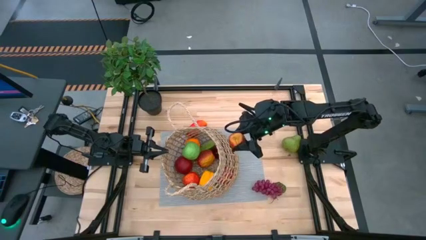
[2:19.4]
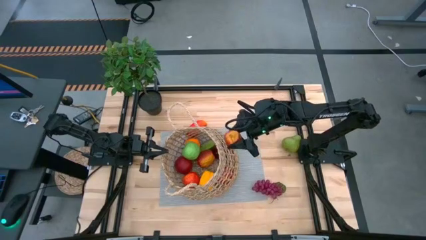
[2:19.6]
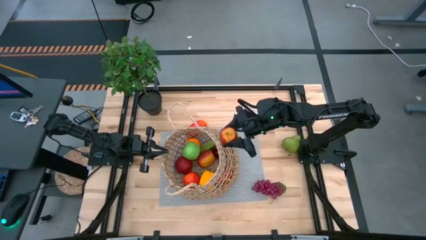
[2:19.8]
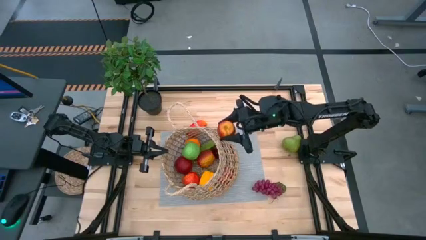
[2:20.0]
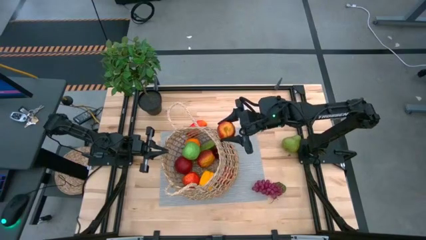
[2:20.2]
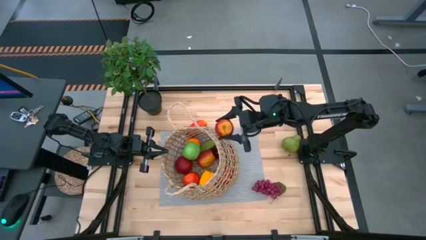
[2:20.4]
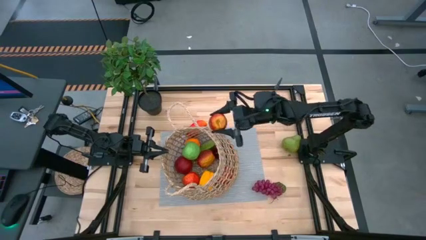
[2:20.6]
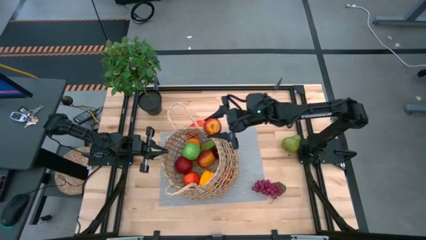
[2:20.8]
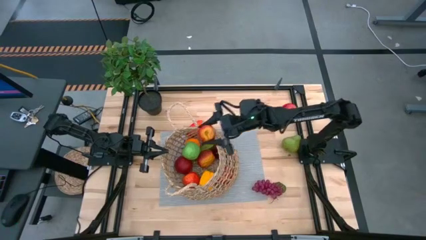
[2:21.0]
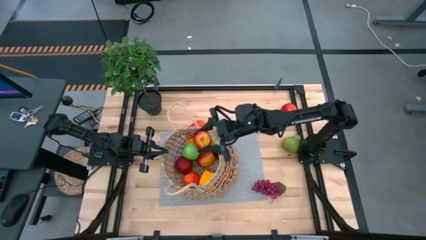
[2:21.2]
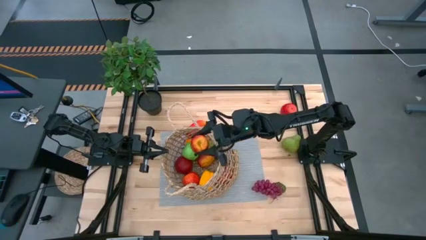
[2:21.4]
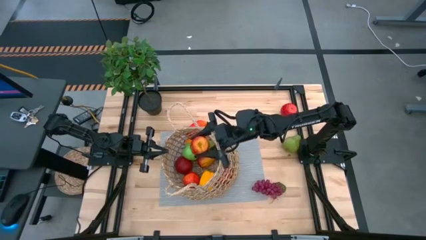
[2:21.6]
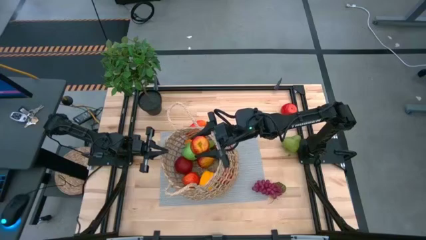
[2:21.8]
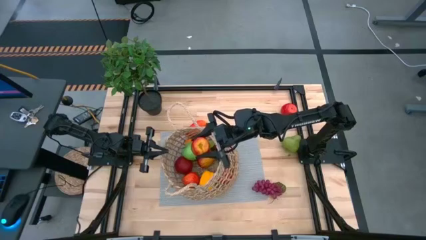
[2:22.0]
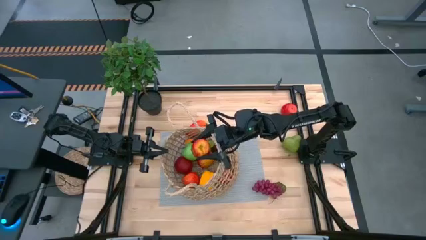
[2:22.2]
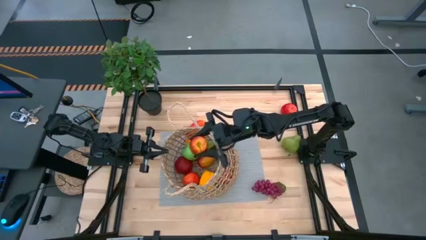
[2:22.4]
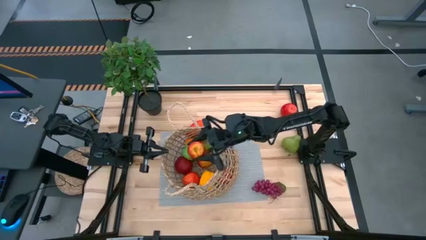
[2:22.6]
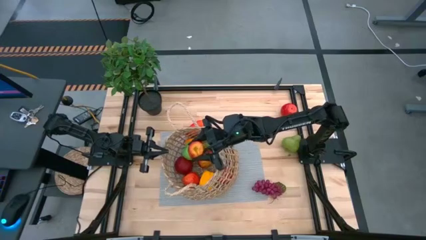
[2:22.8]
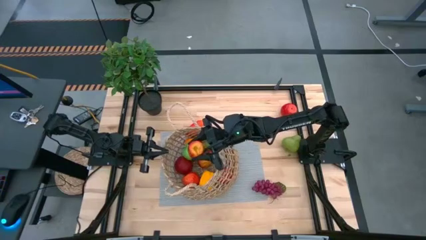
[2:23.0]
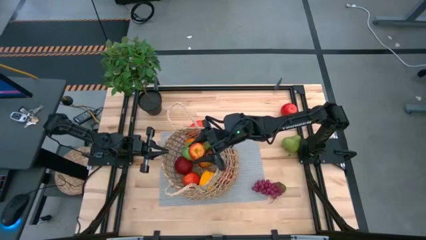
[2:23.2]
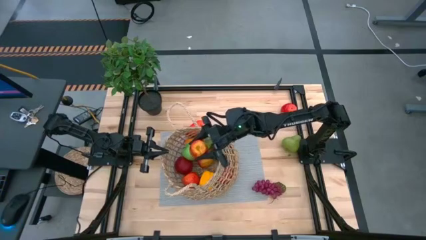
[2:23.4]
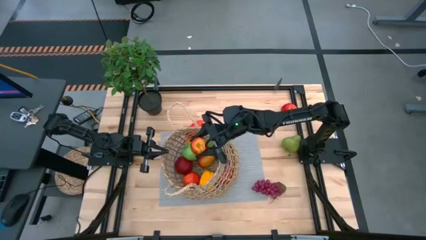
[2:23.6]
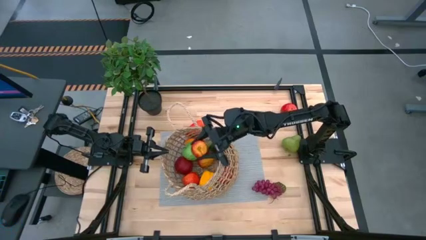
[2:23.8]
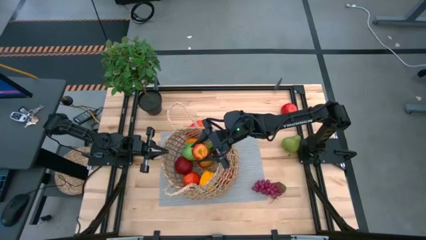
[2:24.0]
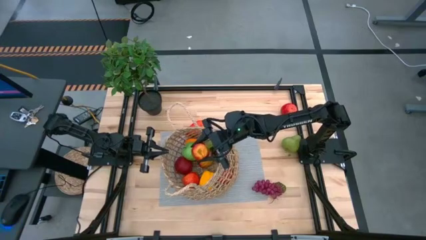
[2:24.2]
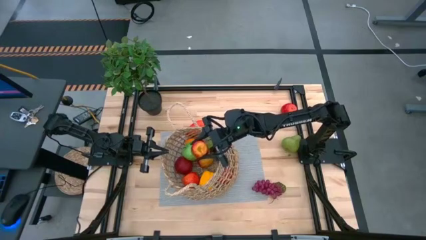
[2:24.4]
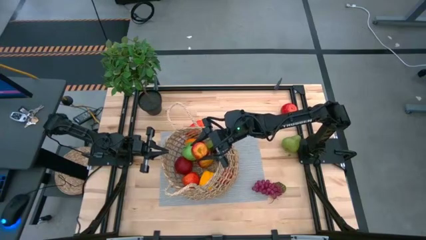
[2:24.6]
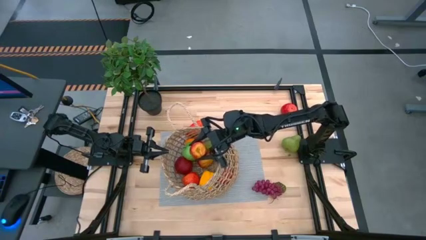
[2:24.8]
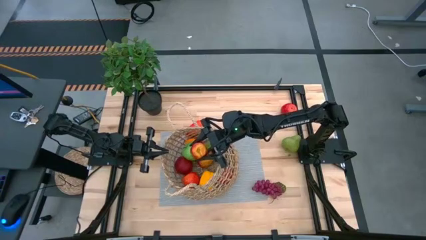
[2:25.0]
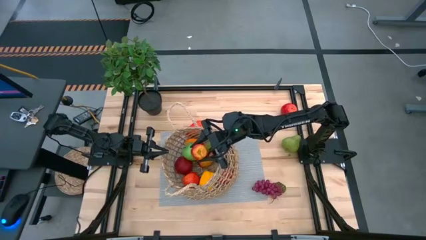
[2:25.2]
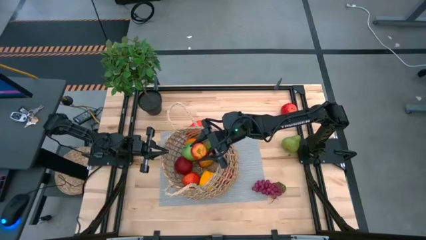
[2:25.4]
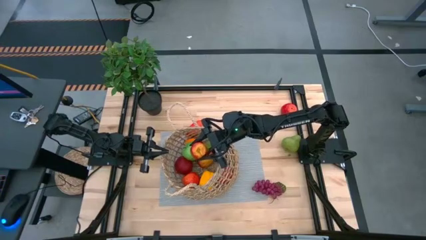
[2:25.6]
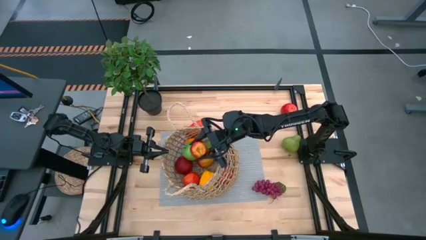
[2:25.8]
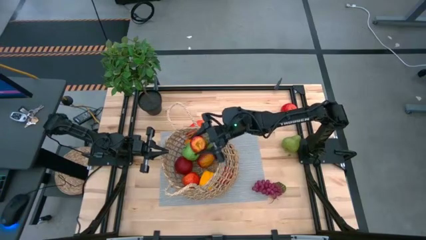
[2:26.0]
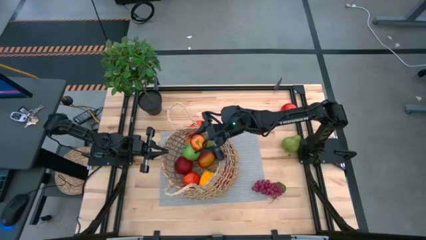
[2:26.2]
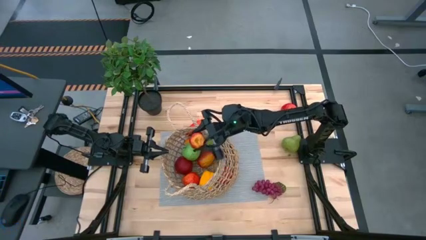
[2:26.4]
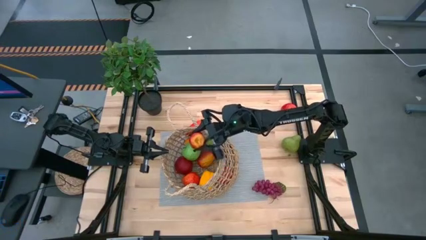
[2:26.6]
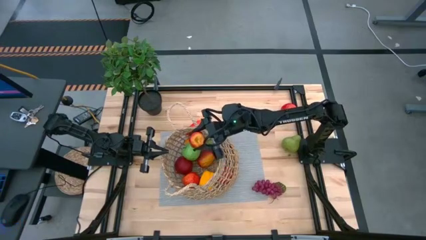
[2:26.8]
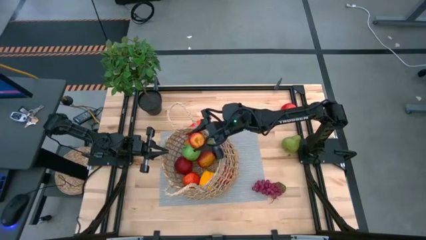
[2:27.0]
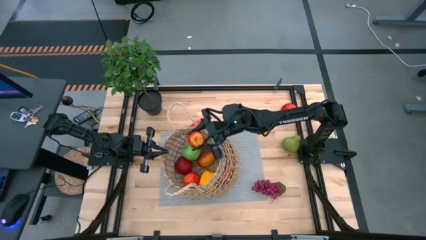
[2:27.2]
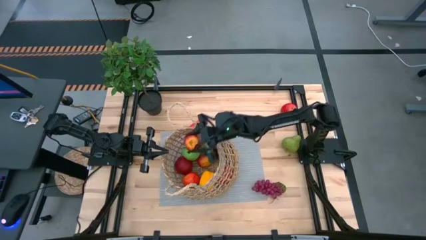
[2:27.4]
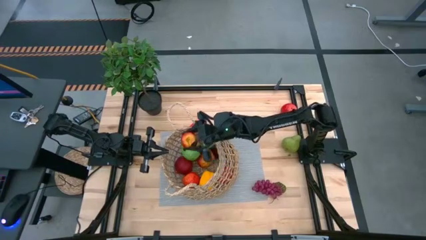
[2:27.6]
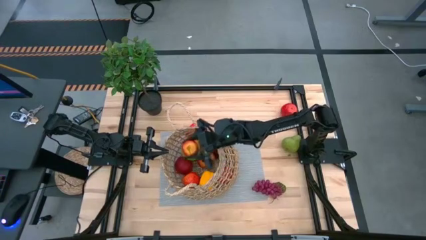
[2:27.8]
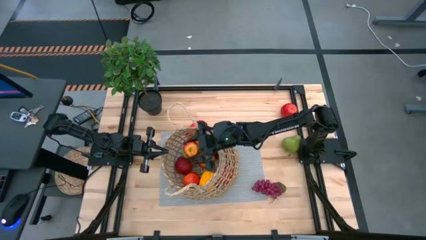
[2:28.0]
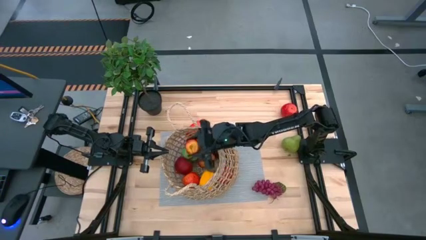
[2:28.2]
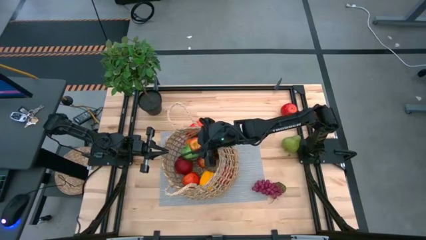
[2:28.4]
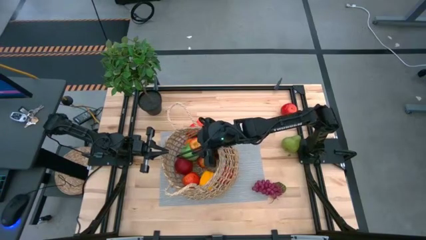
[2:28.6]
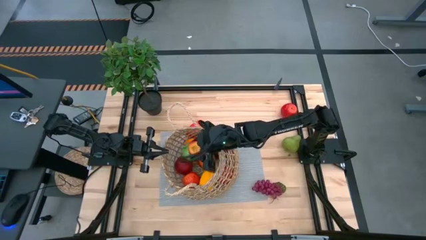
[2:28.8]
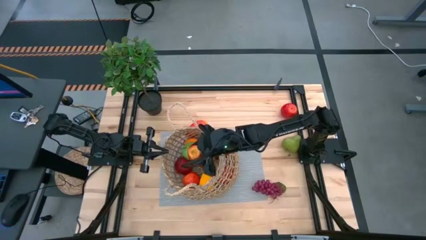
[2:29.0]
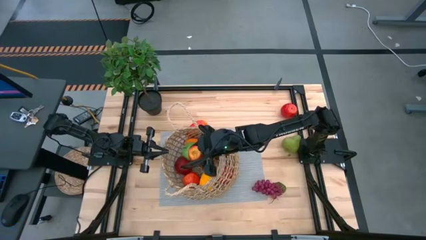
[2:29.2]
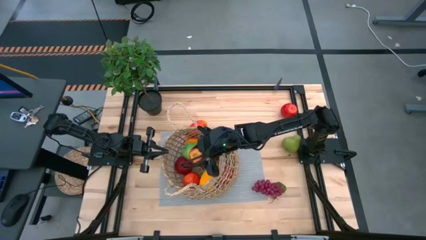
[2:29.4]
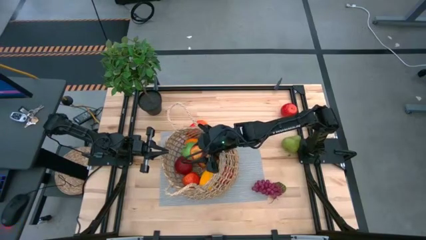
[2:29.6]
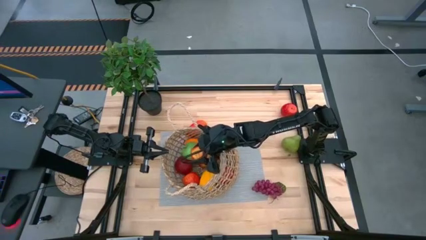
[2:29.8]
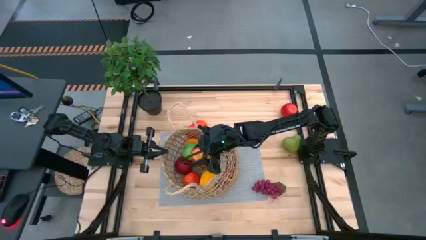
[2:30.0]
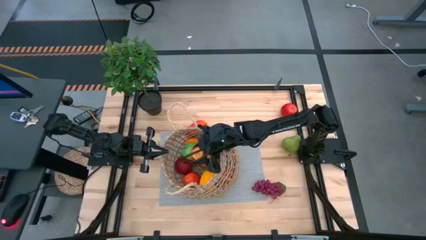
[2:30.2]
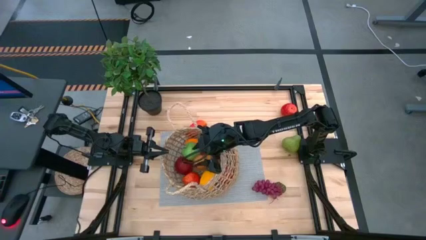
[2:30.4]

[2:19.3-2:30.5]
Task: Build produce basket
Put the red apple into the brown woven basket
